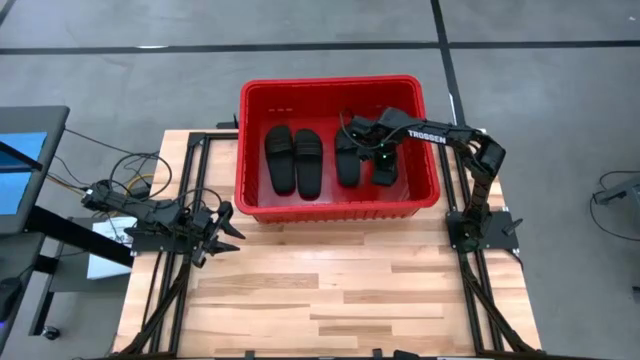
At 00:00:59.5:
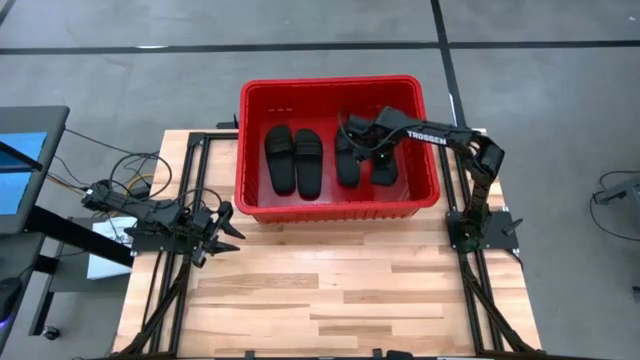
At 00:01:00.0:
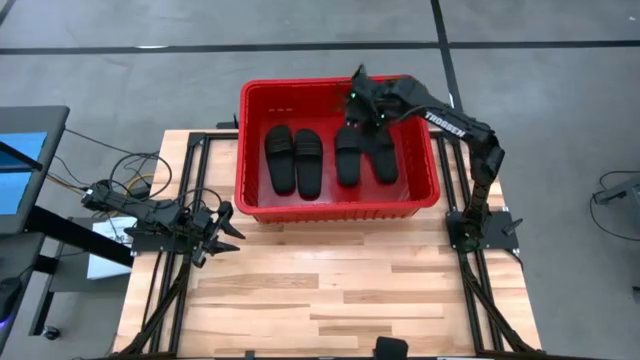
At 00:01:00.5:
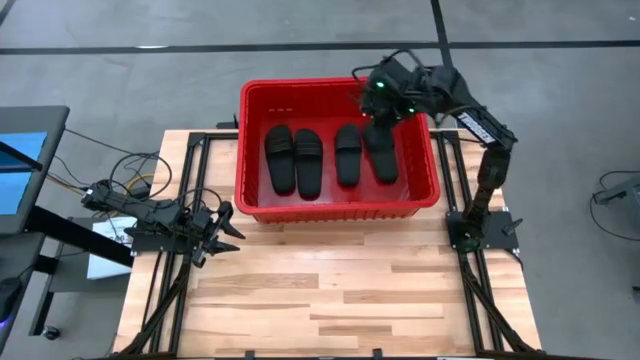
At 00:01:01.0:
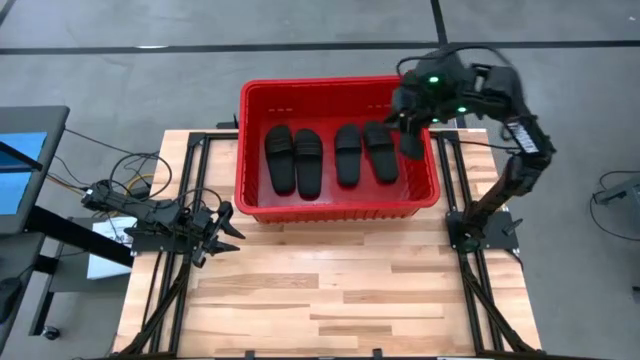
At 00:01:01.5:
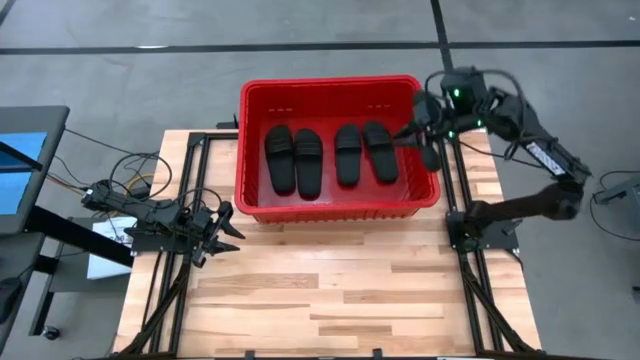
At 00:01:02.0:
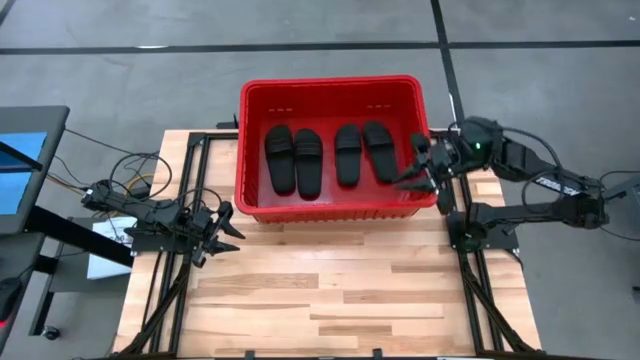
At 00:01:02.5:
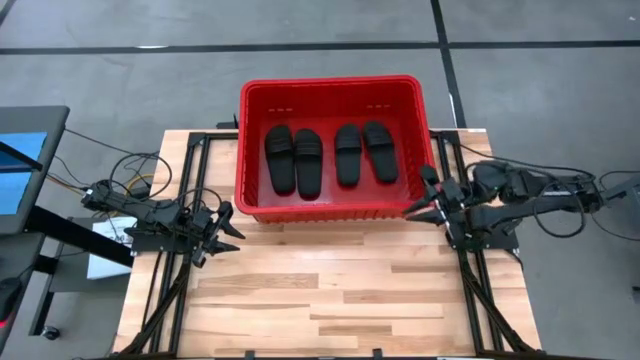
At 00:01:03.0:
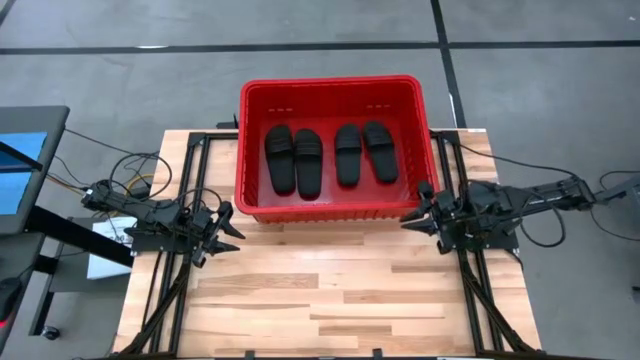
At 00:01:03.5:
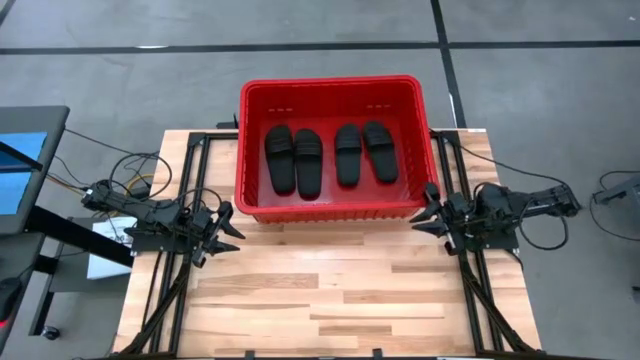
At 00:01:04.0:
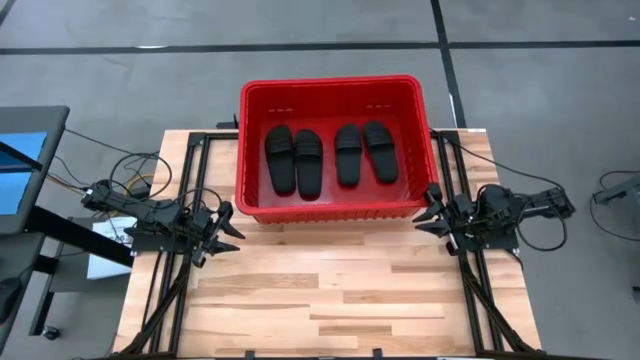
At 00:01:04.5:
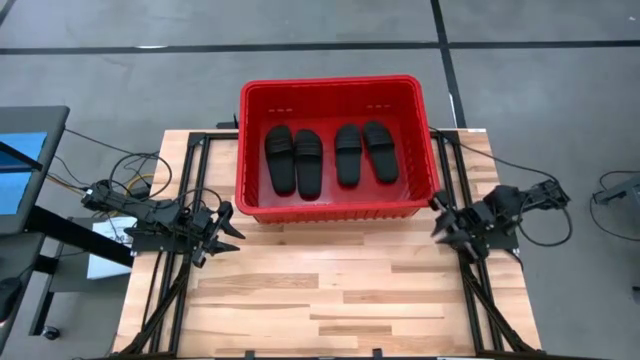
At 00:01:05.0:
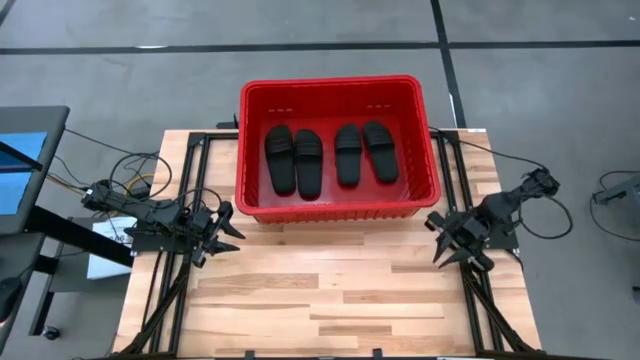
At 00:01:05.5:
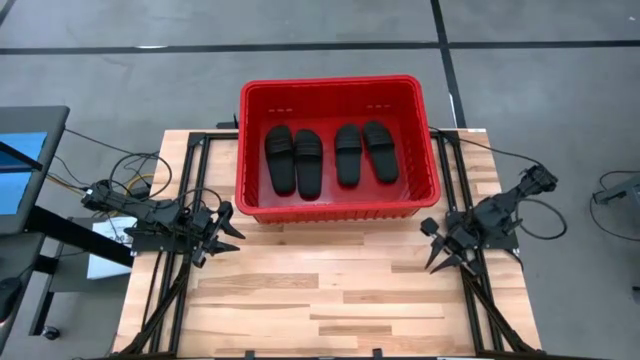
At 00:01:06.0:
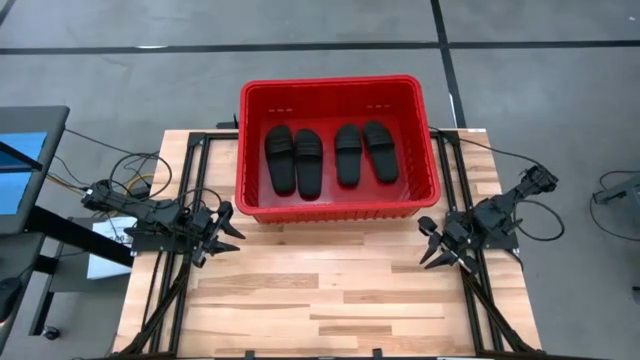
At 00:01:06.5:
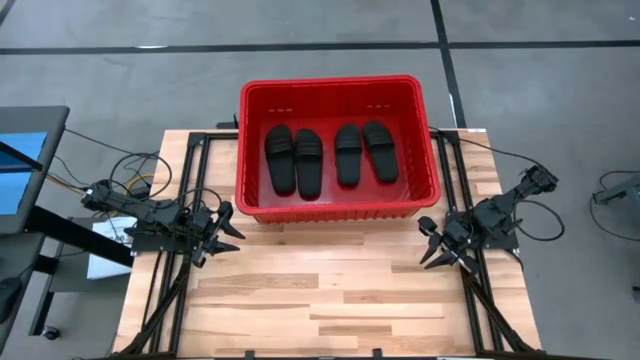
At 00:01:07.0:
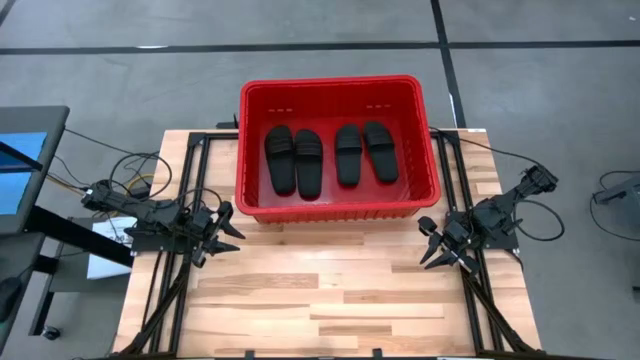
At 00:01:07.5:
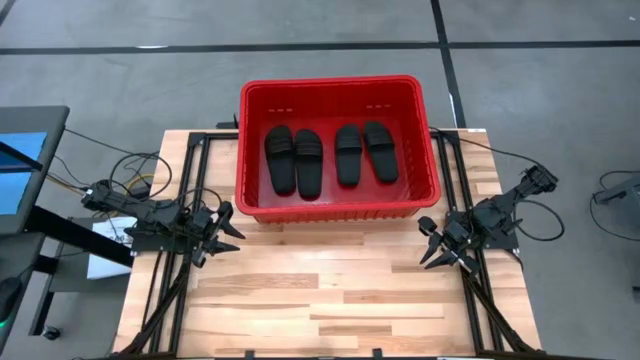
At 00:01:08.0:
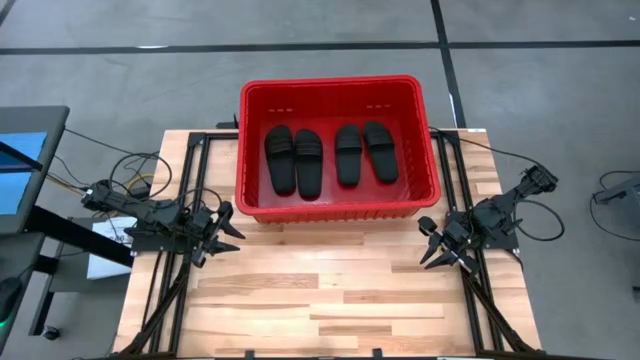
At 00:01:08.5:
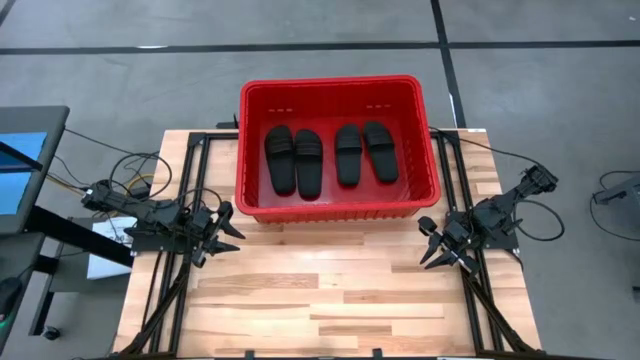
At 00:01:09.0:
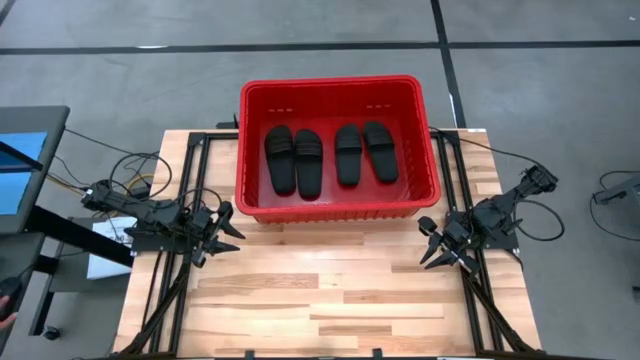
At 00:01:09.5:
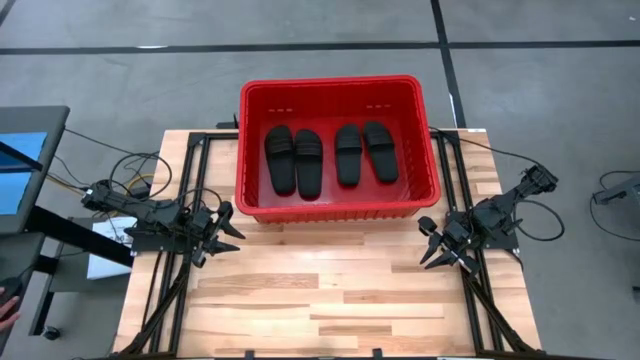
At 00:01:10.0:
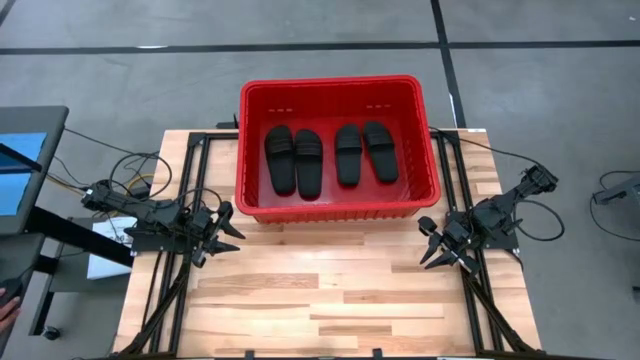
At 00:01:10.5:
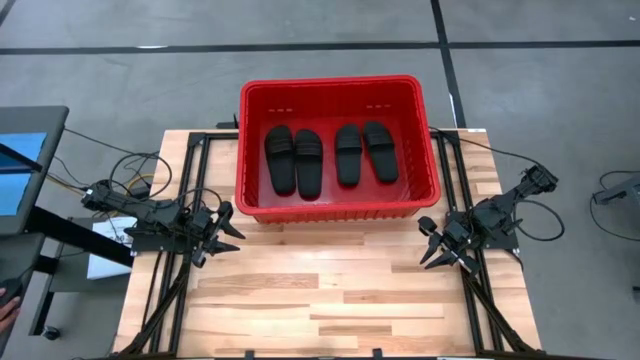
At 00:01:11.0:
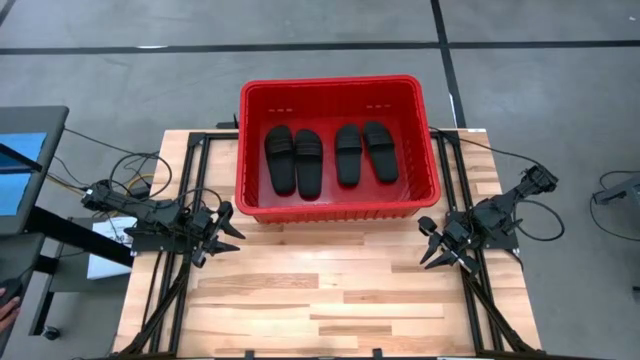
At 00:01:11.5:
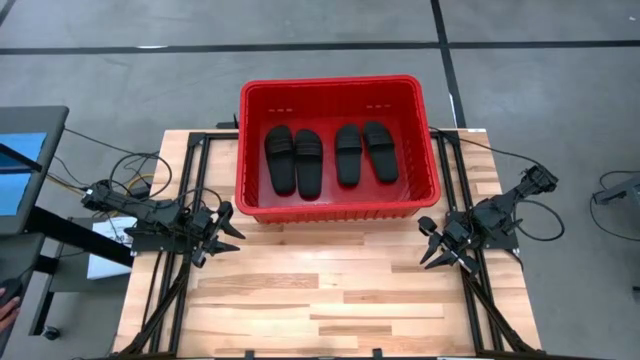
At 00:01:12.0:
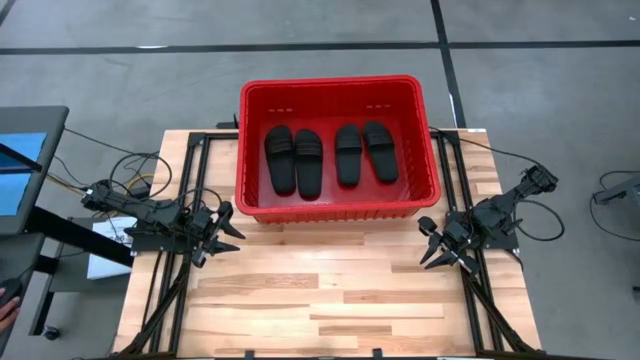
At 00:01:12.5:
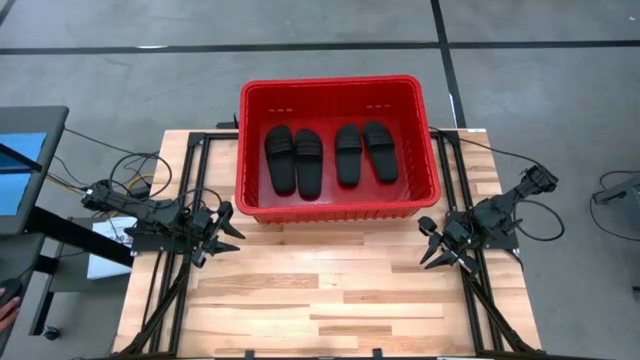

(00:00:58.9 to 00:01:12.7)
Task: Pick and place slides into bin
Return to Home Position
